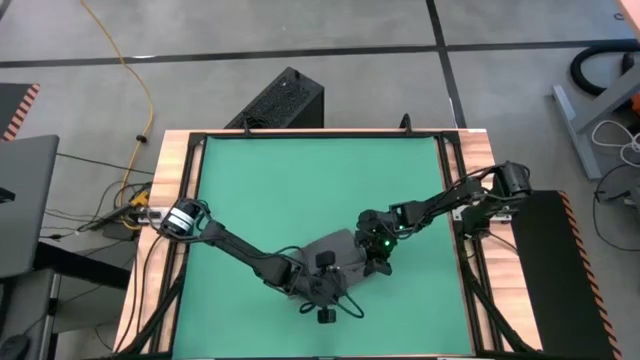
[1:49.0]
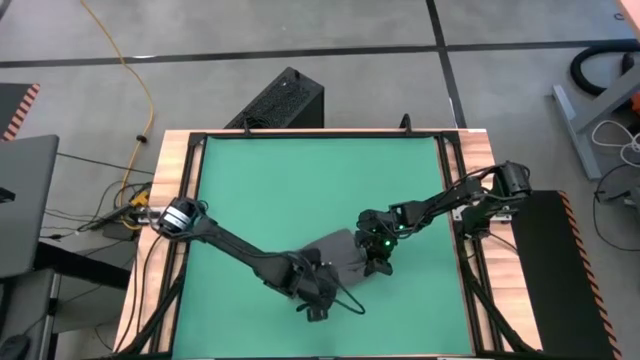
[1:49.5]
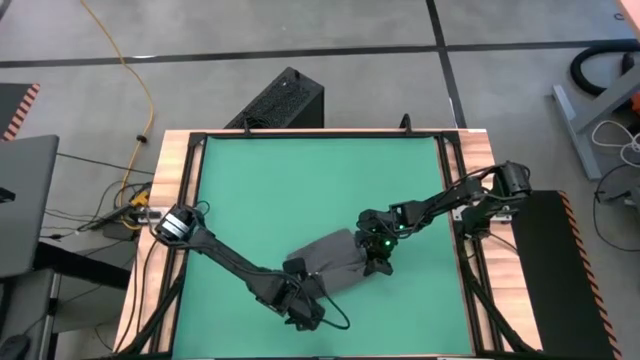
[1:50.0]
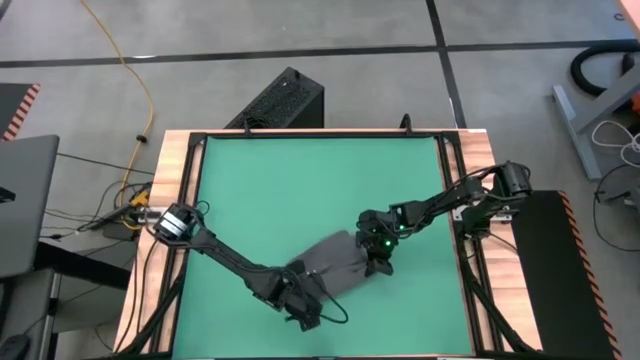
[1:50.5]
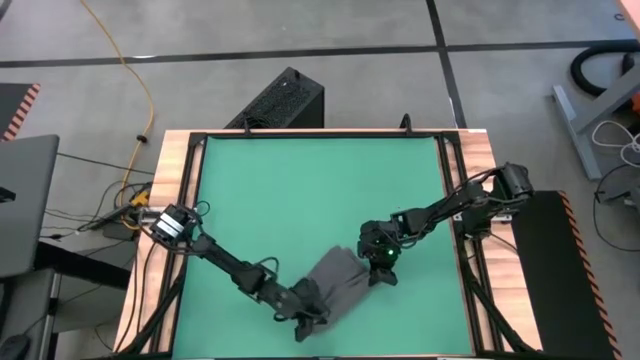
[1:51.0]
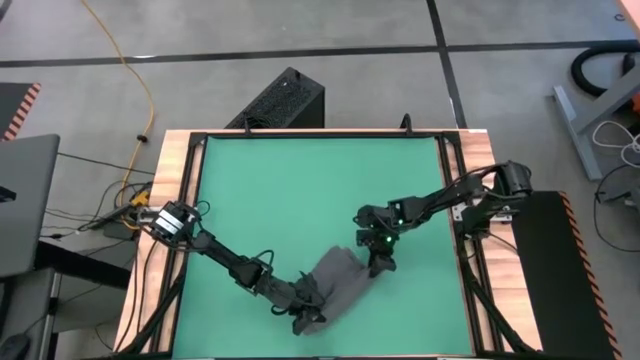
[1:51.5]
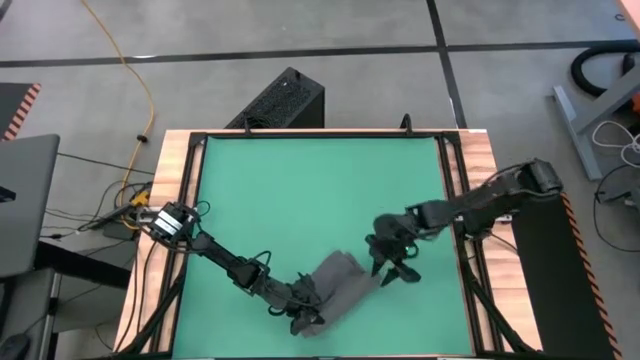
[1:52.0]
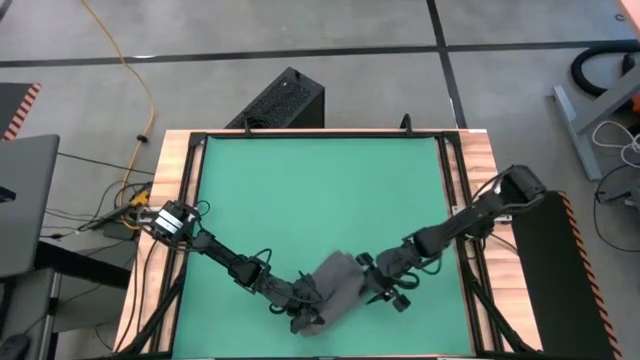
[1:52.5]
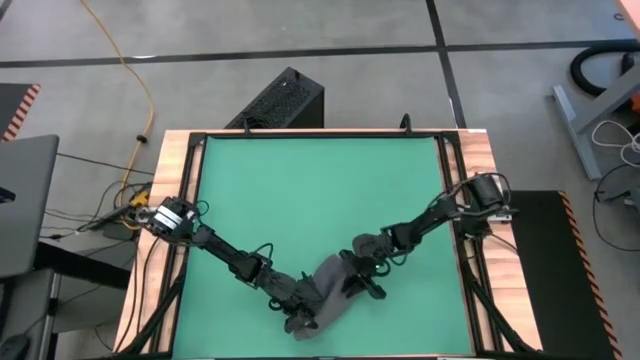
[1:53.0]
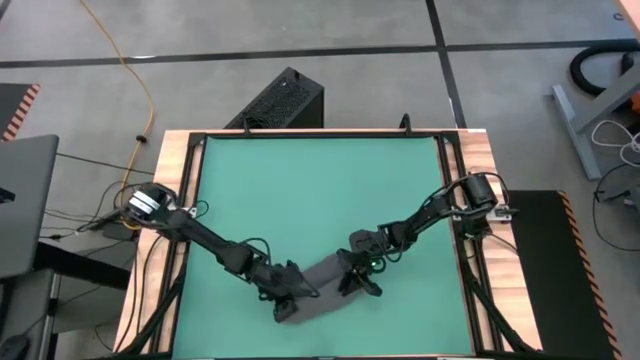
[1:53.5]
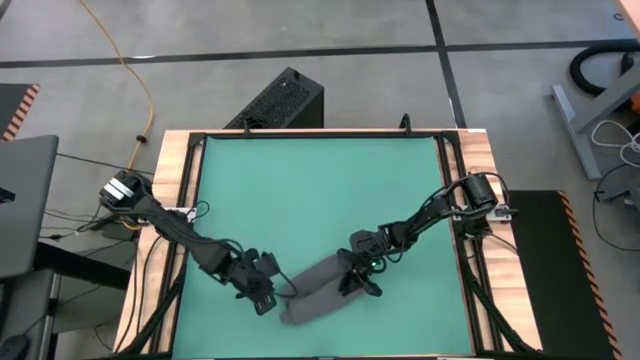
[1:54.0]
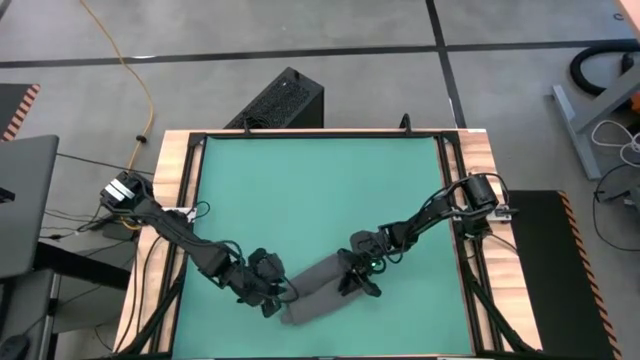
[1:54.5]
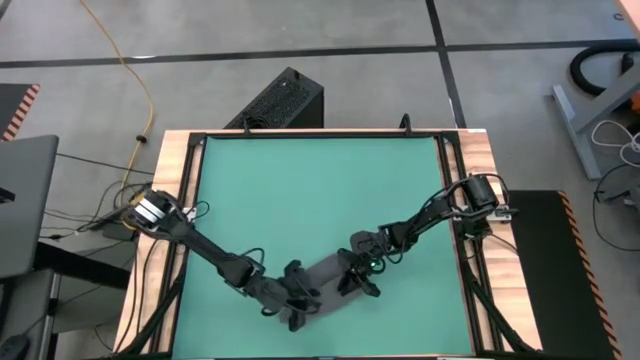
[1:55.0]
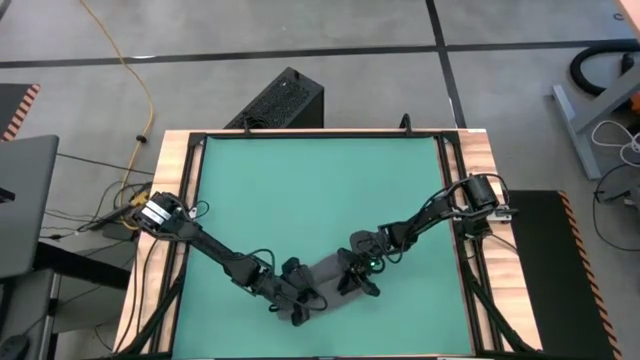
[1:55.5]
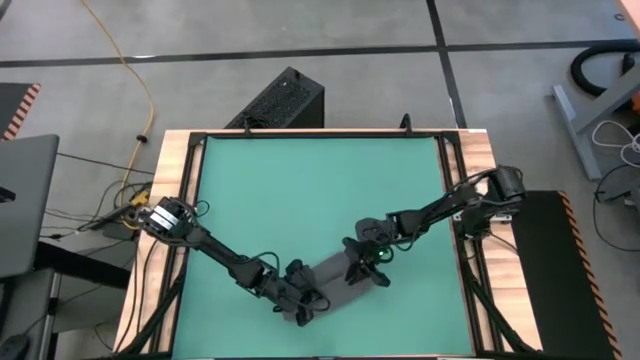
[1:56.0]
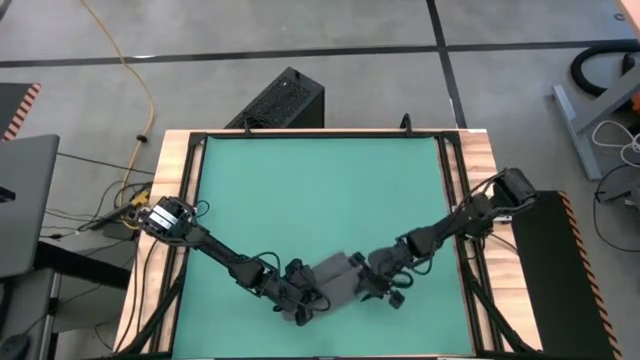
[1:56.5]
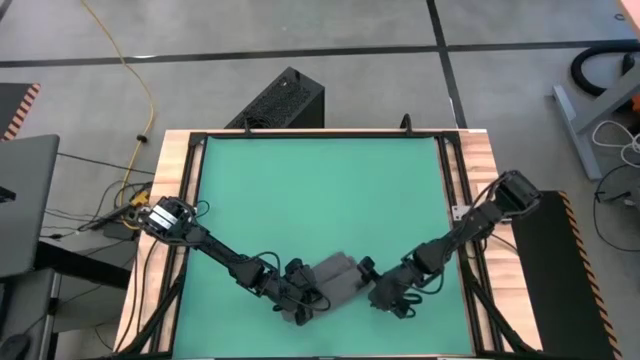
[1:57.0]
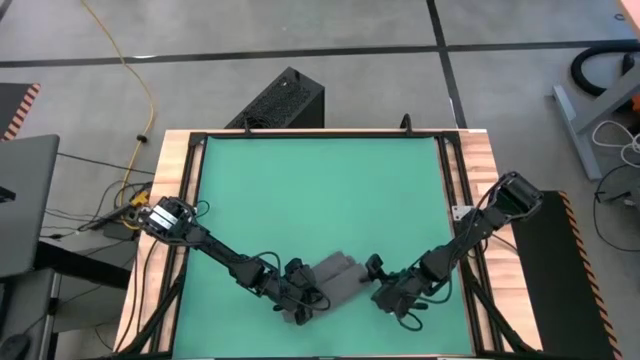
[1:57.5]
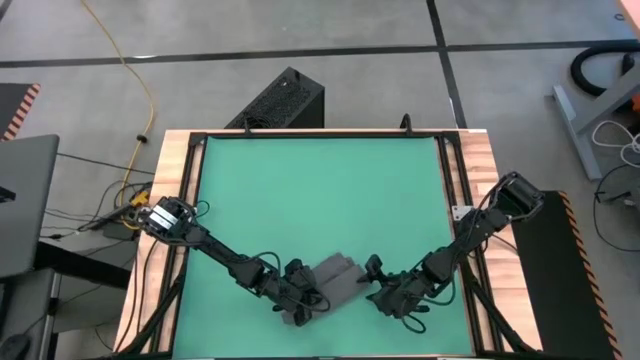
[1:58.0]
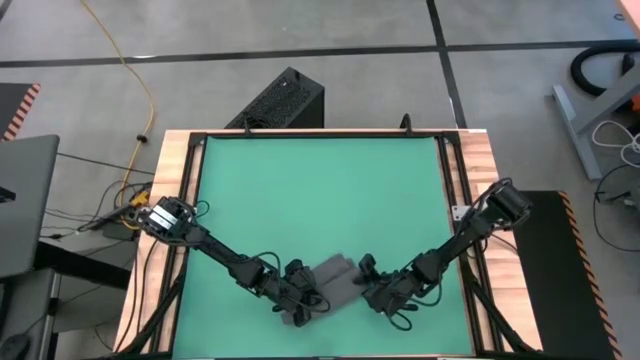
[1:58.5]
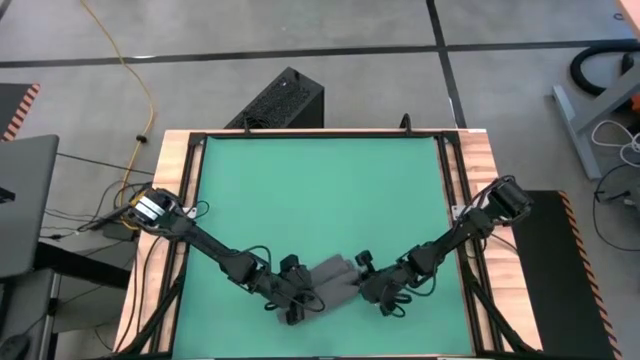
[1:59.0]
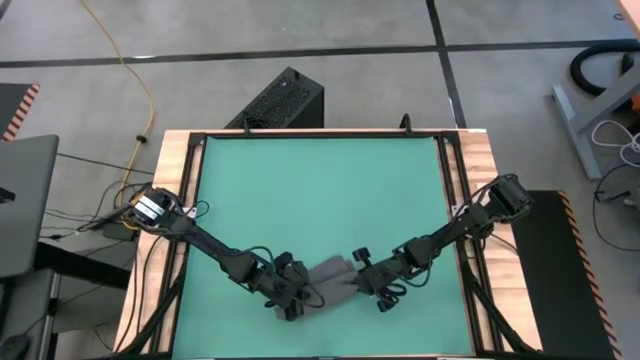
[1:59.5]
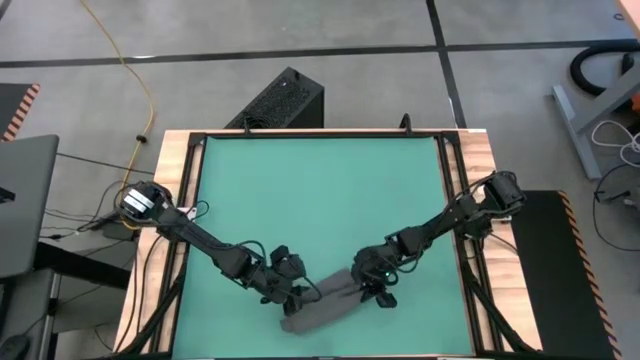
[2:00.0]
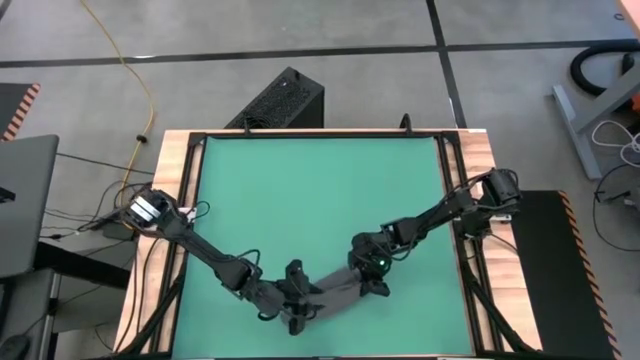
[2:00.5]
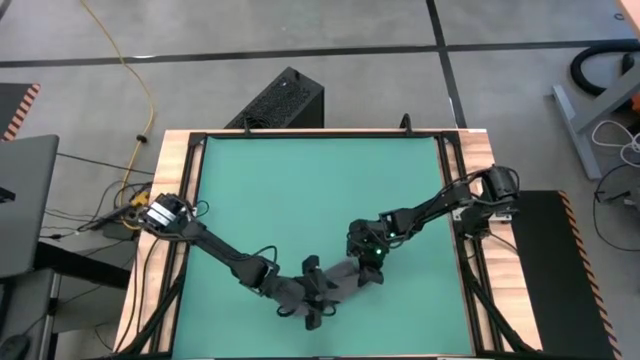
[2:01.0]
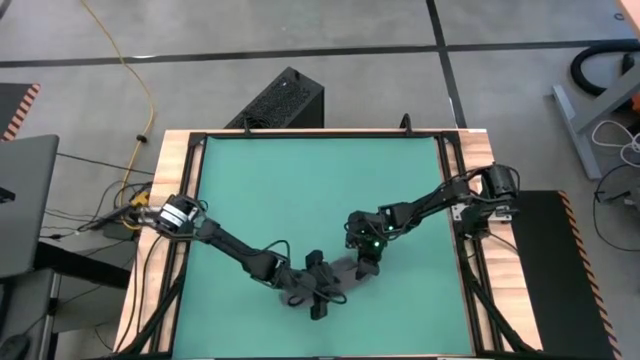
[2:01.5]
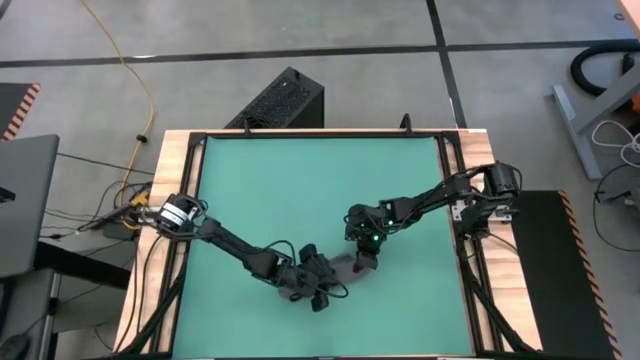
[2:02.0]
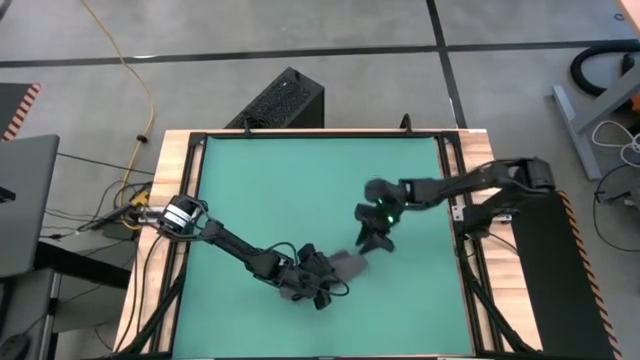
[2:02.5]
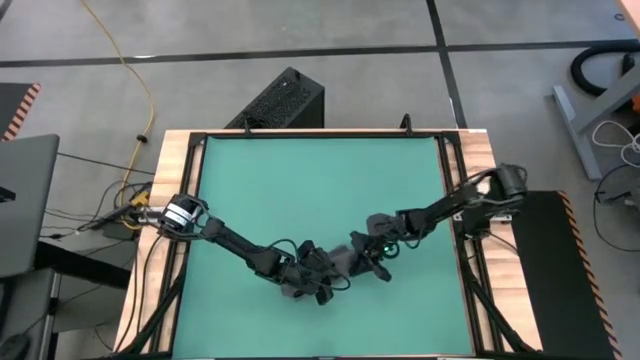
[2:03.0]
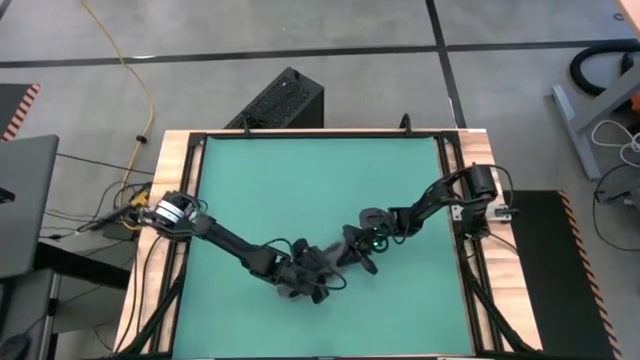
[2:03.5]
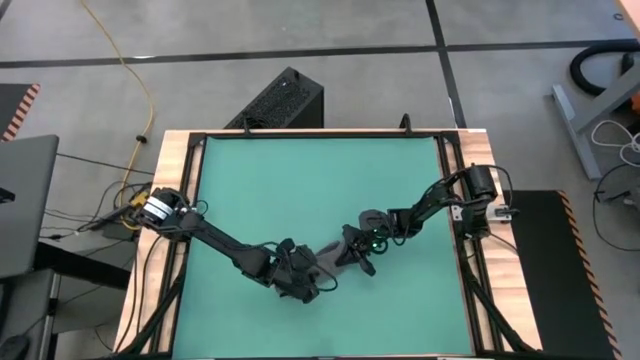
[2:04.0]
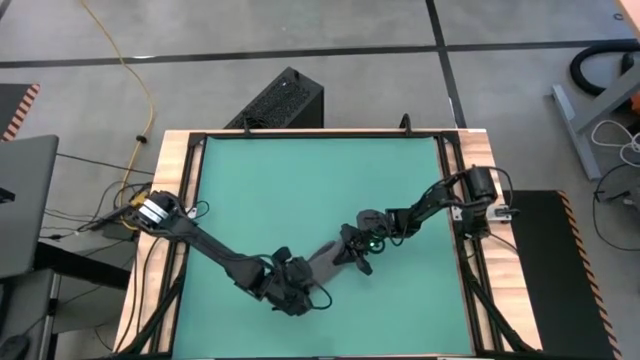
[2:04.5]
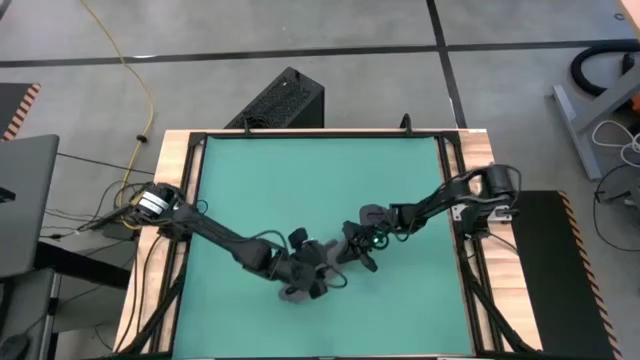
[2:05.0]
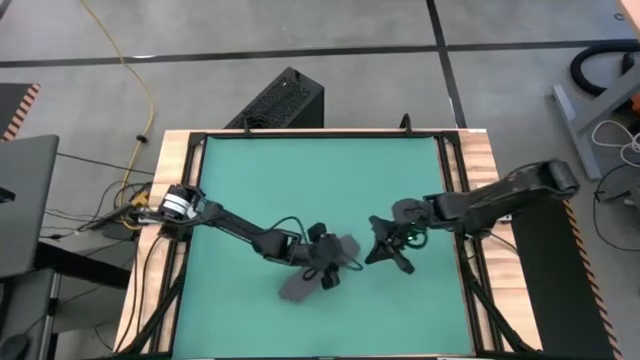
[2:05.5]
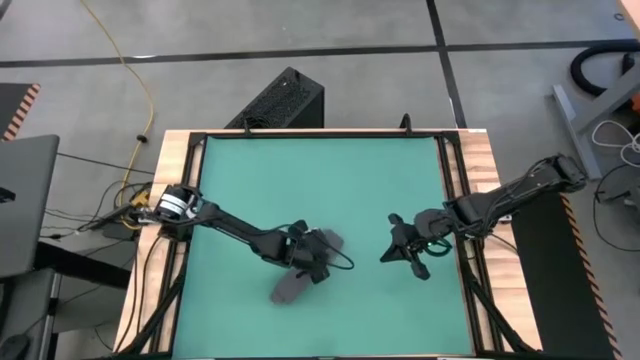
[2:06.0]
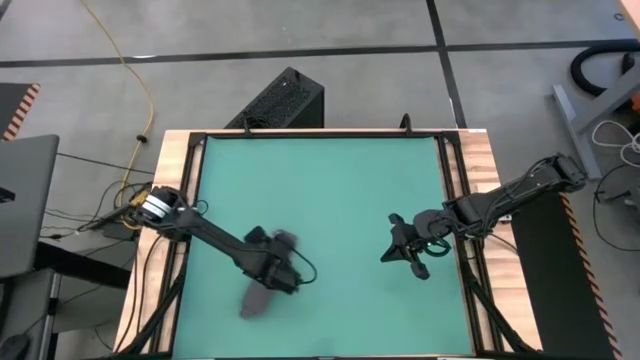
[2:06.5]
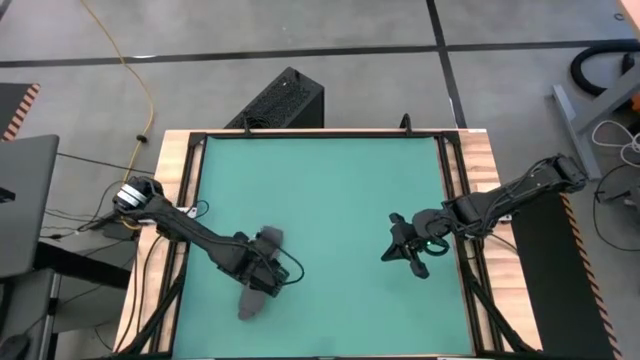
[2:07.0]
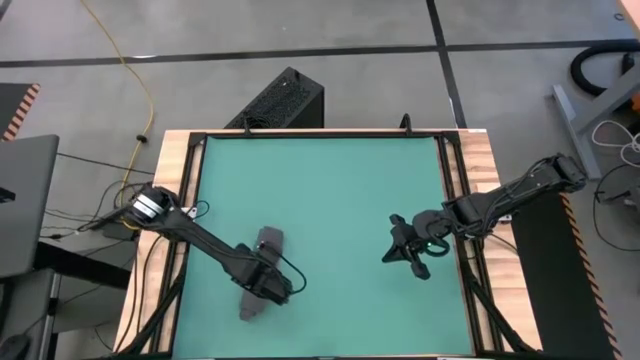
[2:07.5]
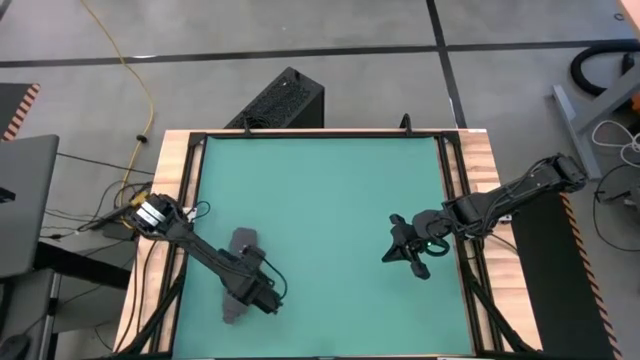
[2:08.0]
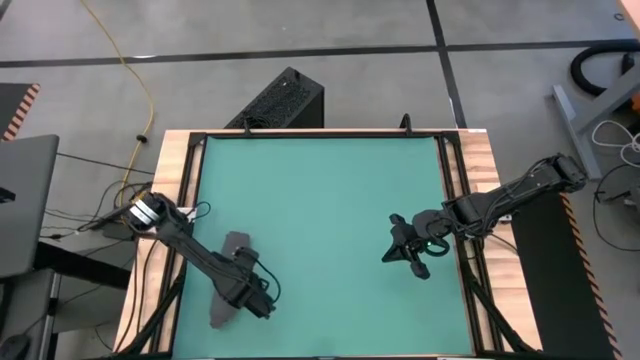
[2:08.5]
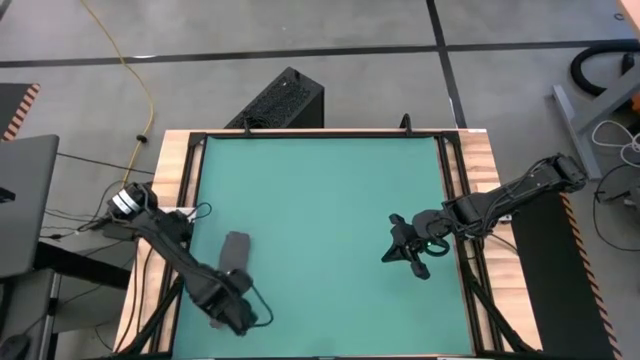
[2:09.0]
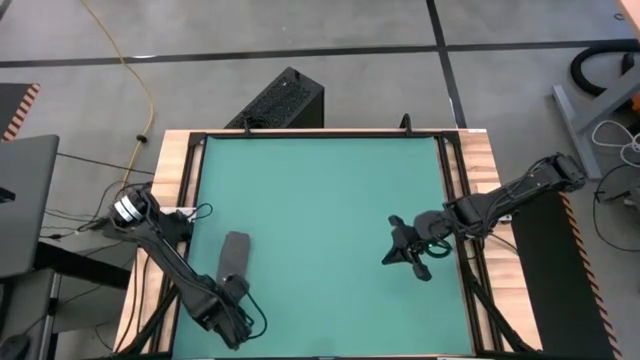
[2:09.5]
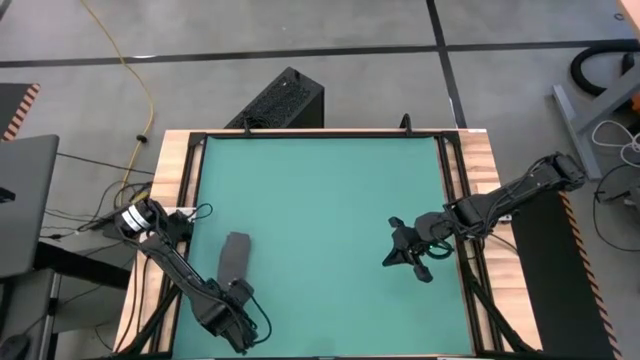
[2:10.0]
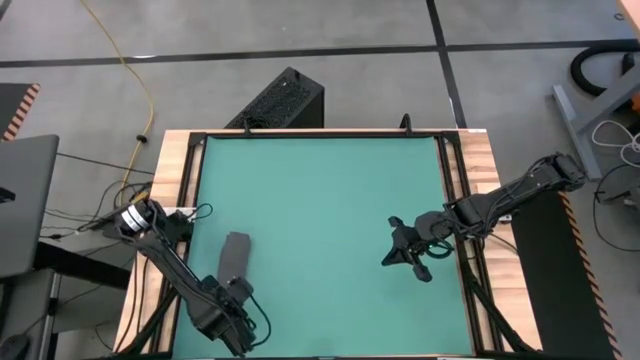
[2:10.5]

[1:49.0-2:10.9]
Task: Roll towel
Roll the black towel
